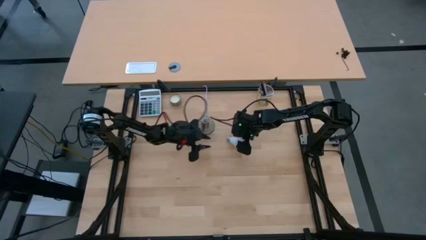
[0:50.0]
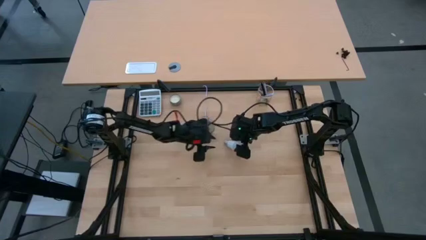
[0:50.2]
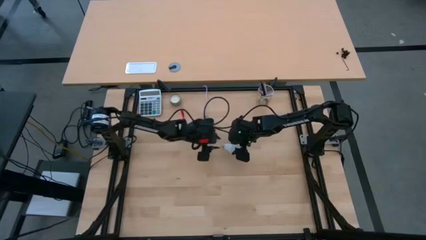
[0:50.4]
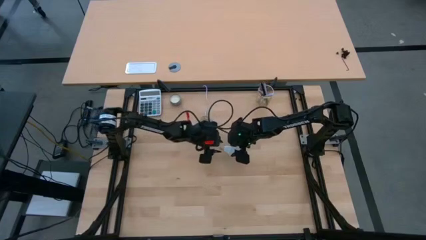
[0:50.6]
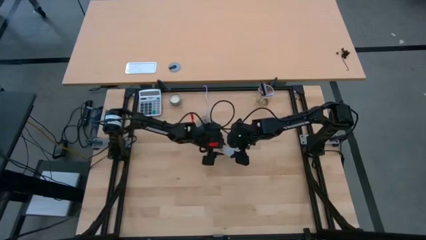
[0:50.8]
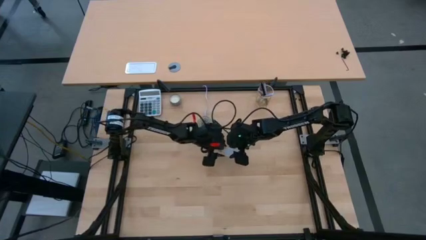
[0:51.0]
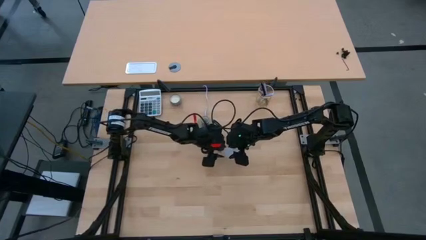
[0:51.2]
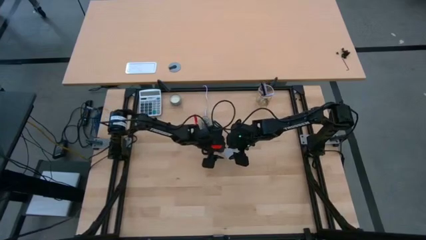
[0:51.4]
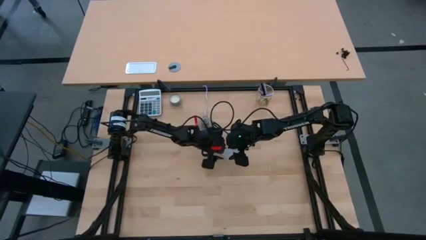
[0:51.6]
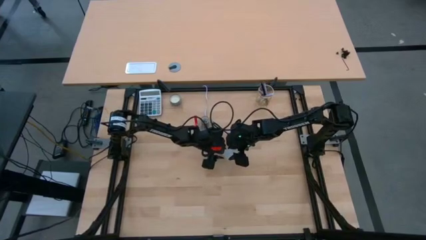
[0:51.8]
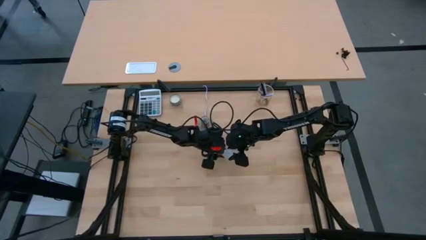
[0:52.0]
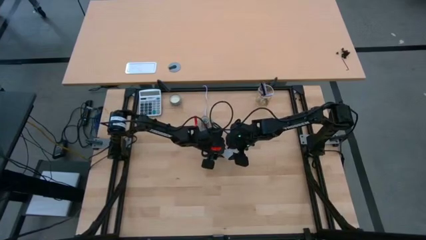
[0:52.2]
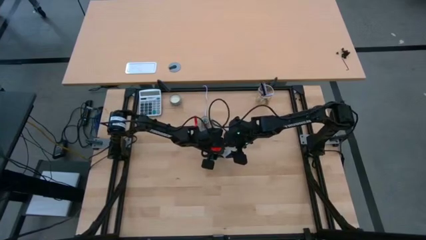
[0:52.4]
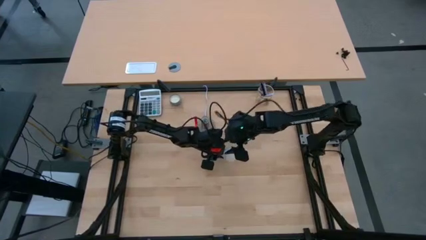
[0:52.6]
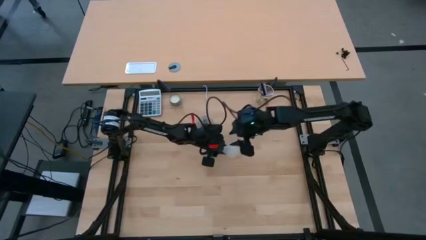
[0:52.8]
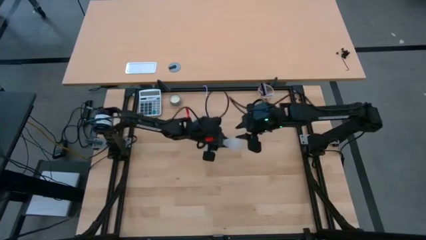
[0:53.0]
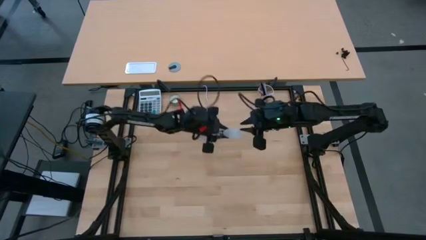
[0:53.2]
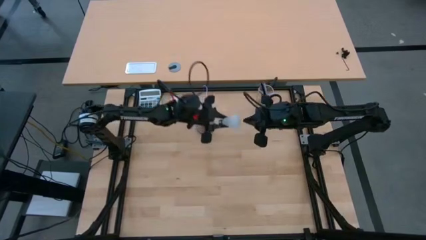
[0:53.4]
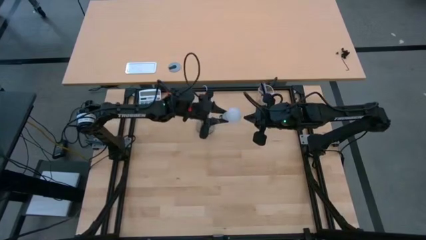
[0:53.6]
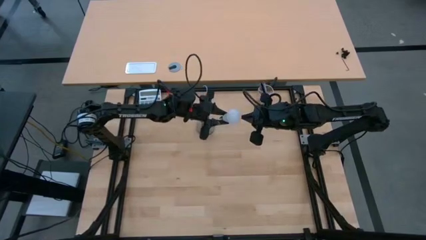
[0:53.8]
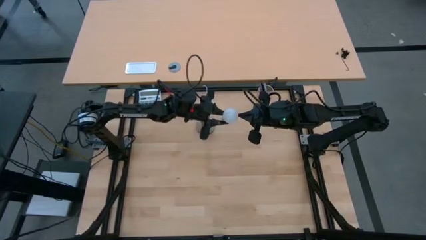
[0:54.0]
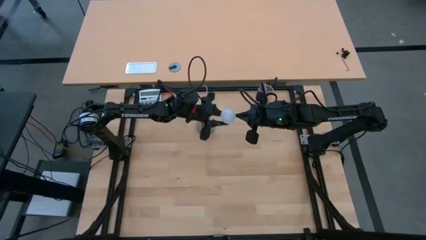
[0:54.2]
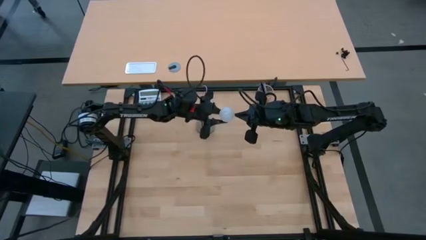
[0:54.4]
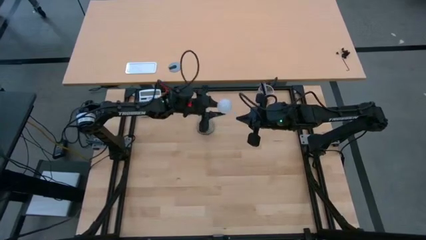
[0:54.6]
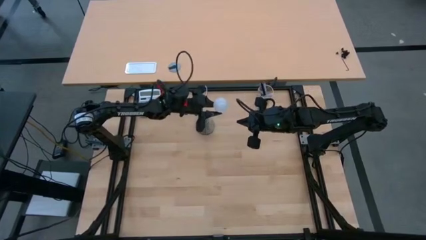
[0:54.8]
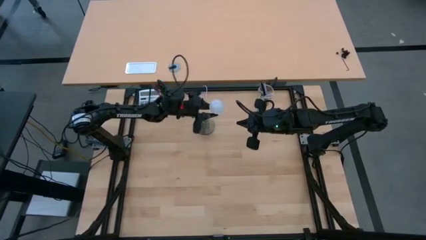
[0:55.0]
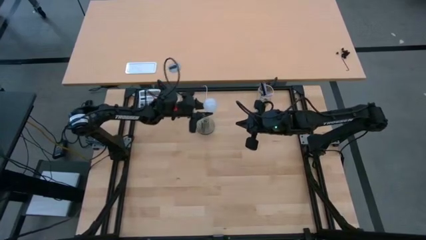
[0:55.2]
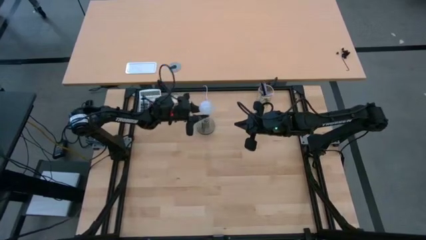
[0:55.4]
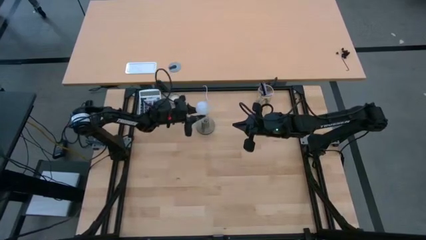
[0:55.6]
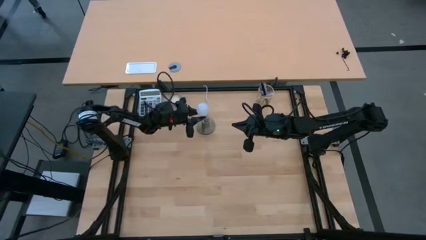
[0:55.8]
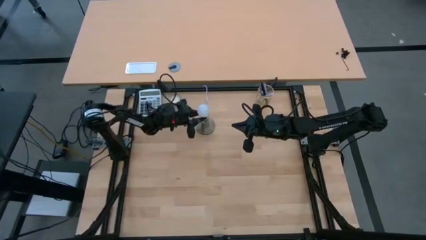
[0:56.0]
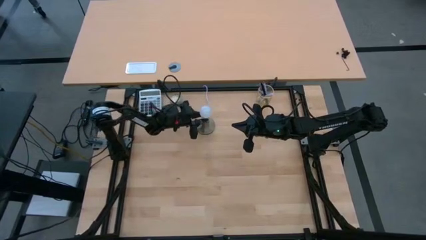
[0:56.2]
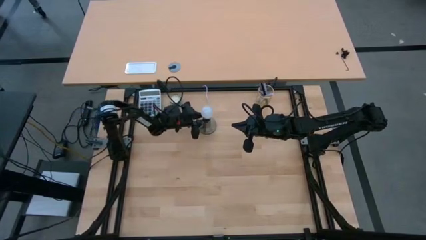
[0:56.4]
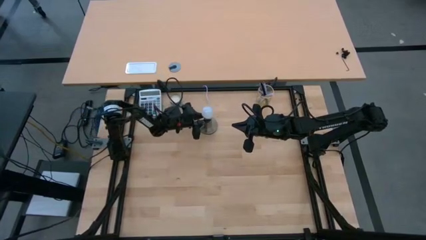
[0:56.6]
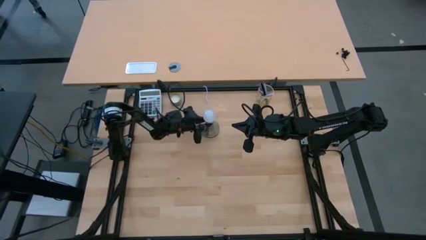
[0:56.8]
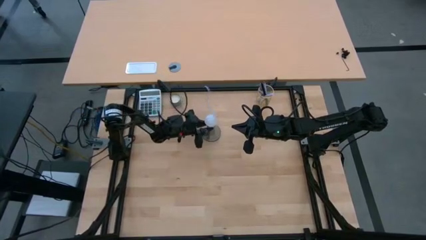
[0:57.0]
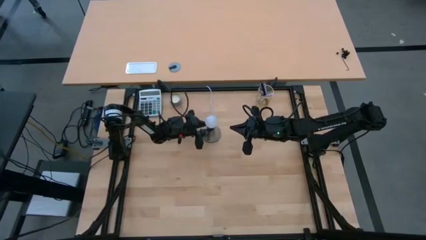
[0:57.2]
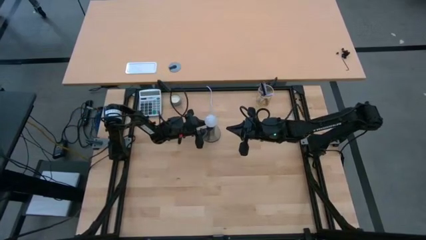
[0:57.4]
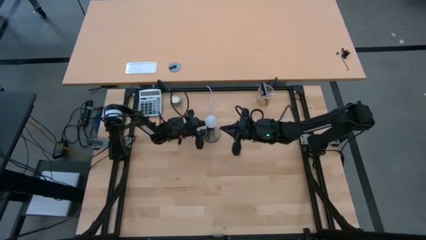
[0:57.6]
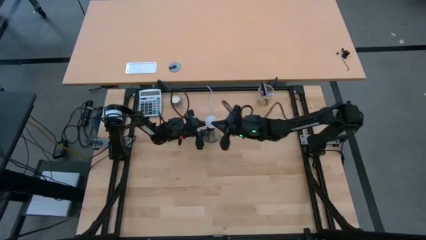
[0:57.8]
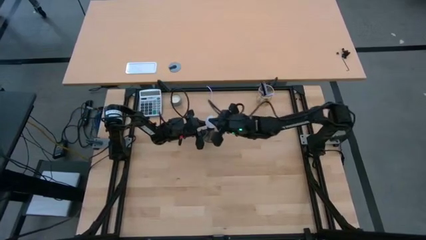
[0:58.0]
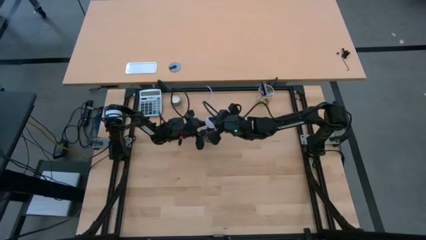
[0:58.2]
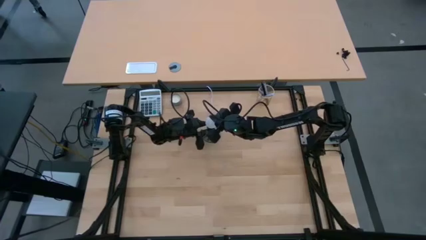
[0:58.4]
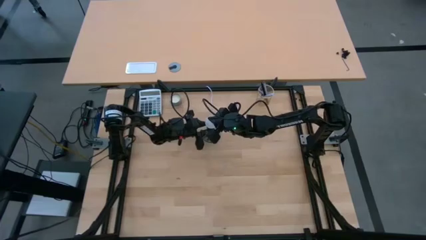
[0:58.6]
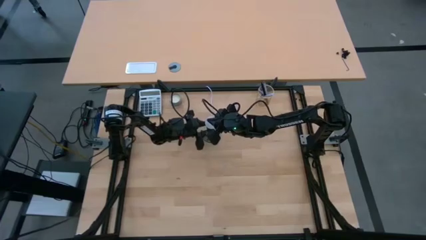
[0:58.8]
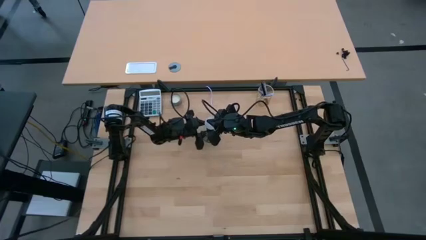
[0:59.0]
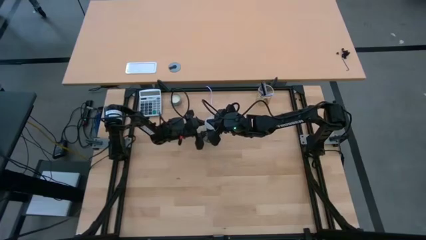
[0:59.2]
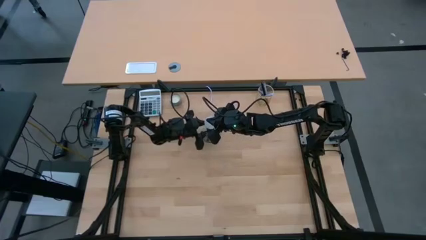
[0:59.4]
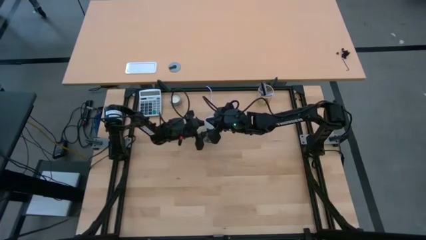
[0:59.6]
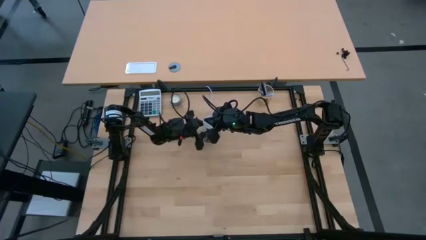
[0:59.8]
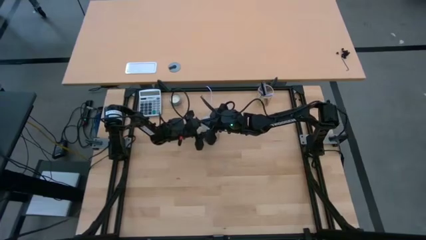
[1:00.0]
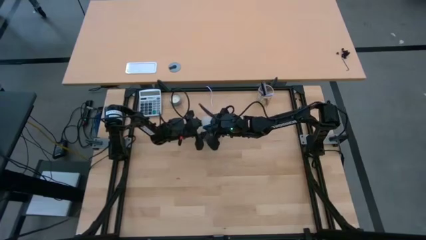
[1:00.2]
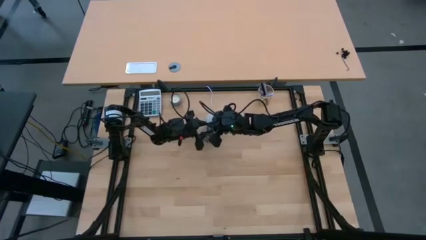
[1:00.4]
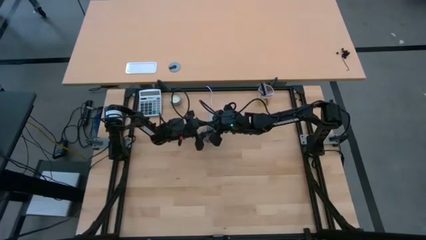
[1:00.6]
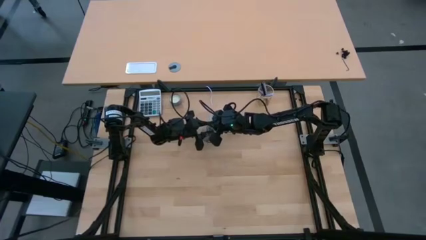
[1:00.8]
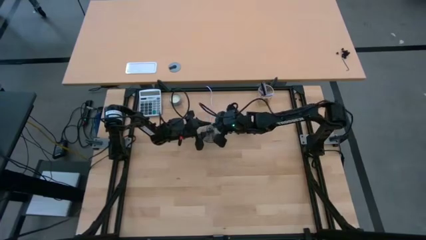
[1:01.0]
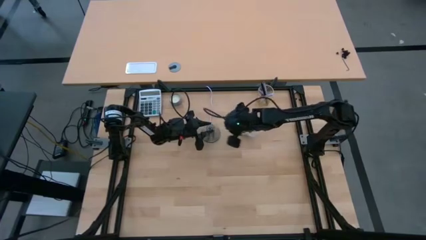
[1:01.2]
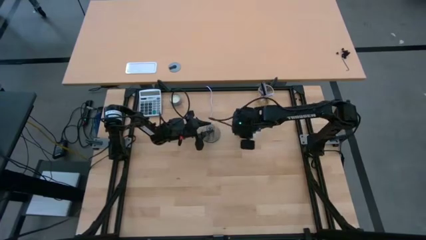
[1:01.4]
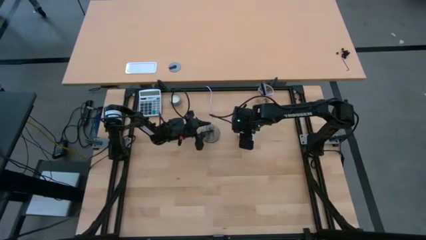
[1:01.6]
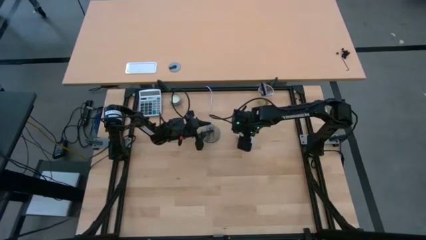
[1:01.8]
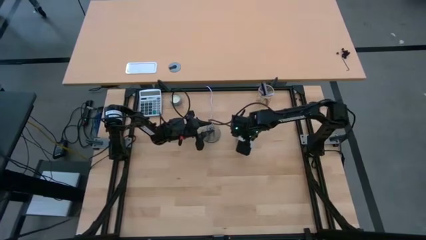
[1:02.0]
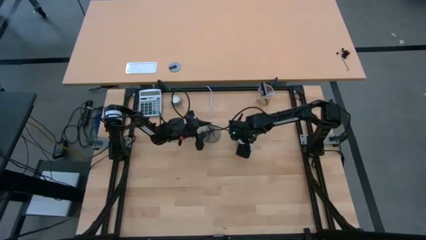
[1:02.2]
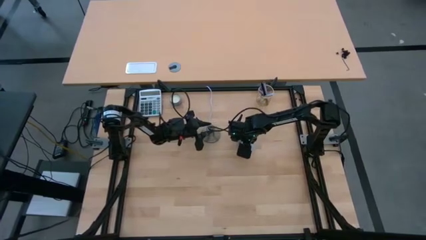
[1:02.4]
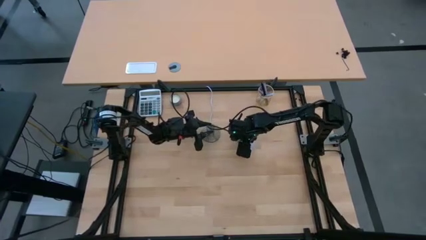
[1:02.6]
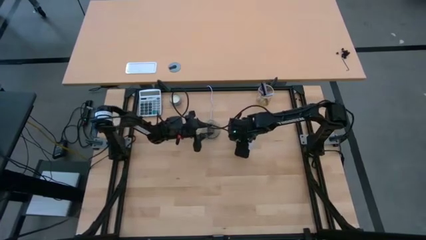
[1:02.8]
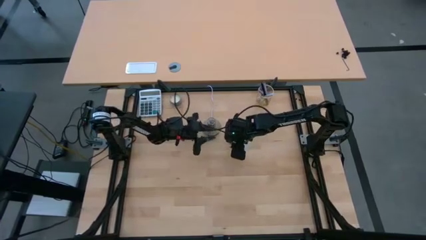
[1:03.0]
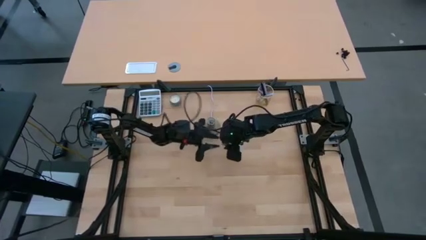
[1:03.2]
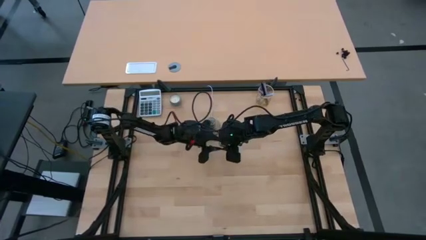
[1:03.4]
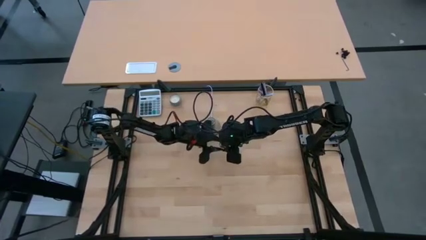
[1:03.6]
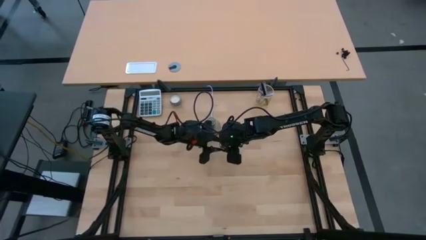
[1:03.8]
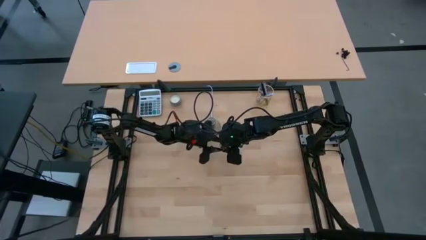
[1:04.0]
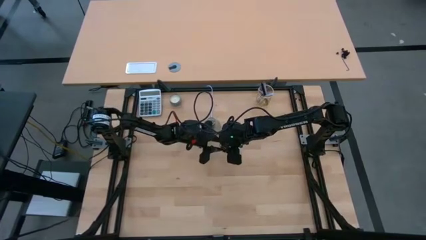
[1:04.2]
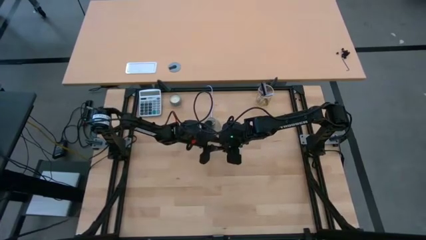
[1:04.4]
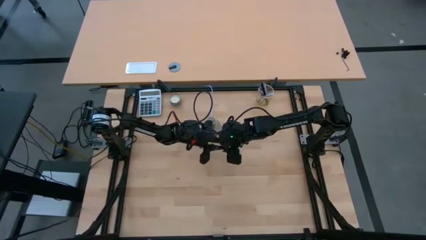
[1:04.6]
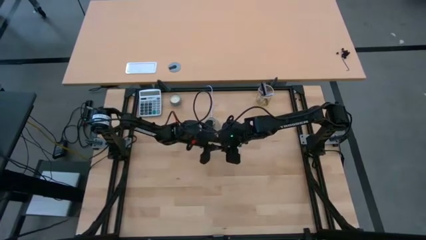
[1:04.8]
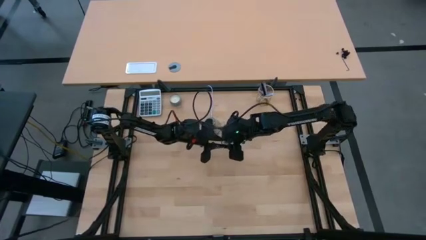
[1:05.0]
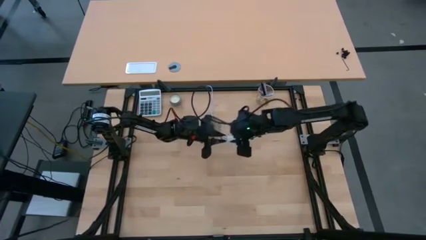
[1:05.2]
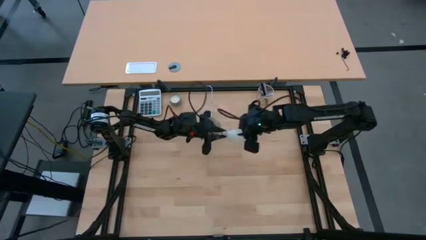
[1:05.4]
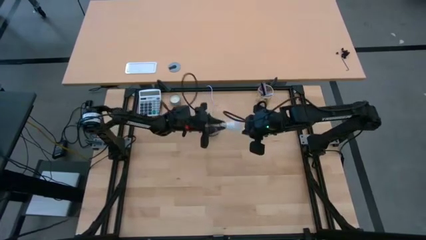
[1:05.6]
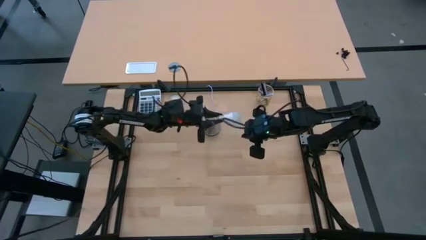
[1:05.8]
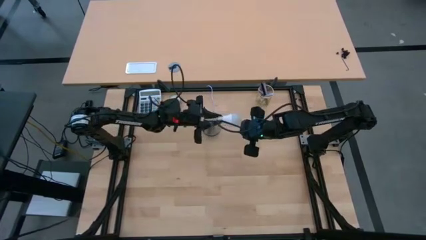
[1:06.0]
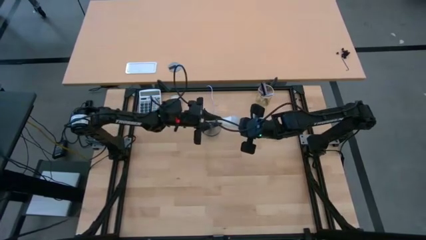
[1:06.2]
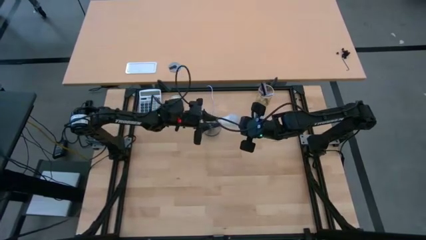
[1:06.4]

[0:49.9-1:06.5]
Task: Screw lightbulb
Insert the lightbulb into the lamp
